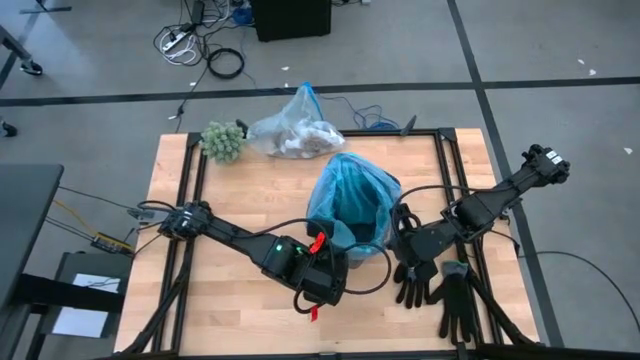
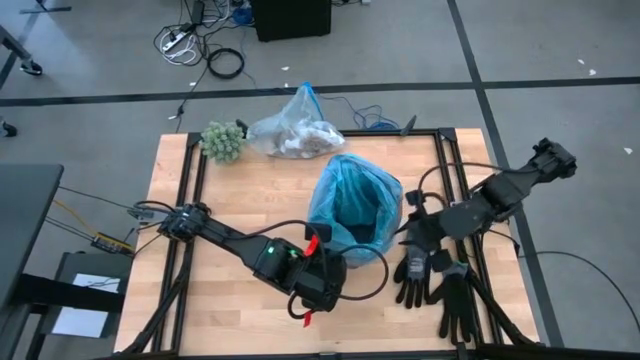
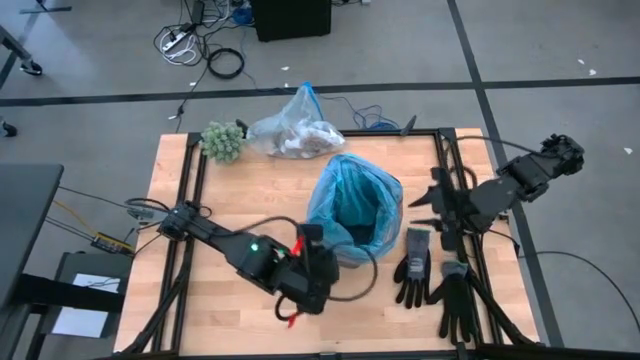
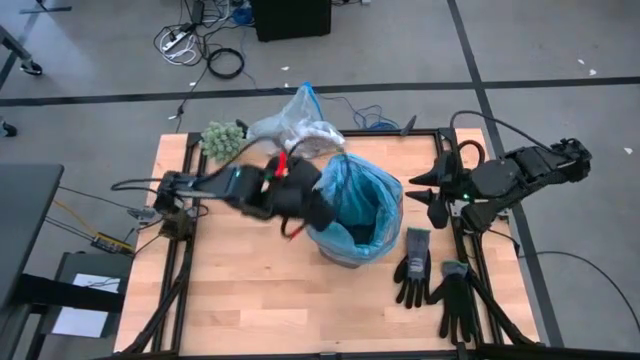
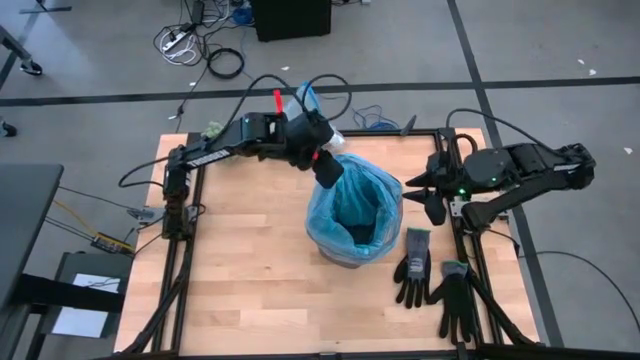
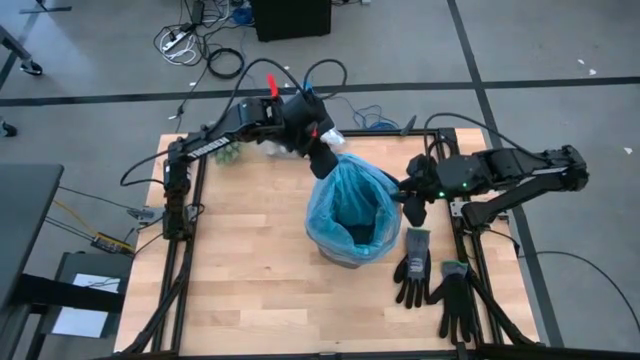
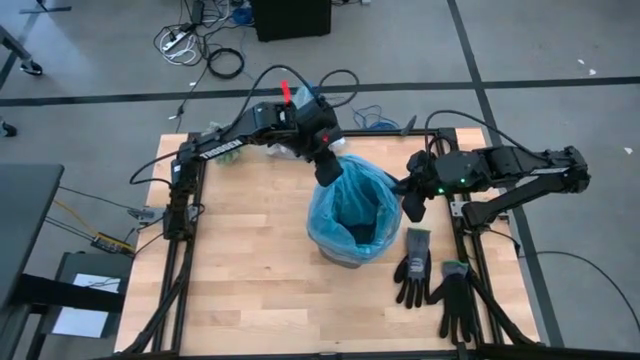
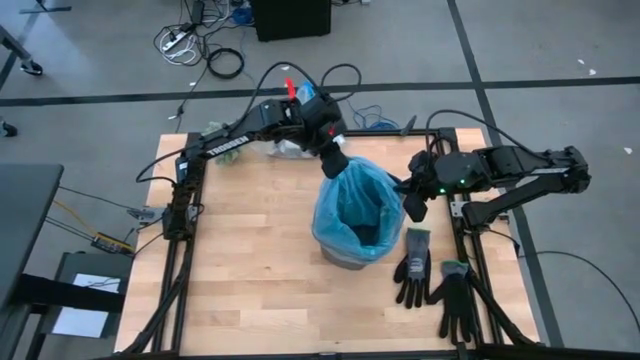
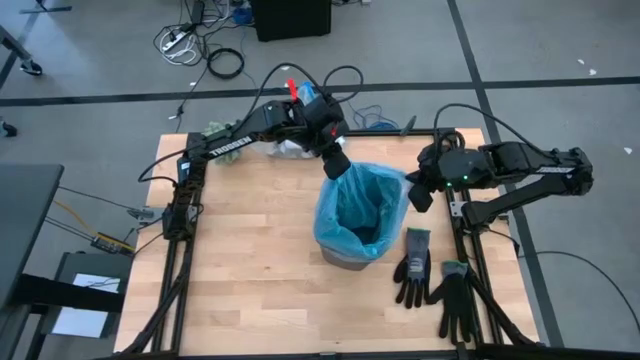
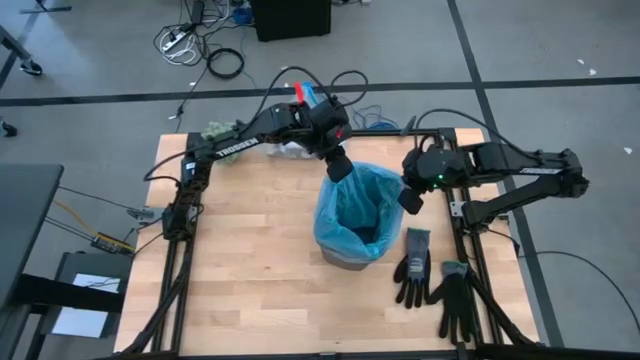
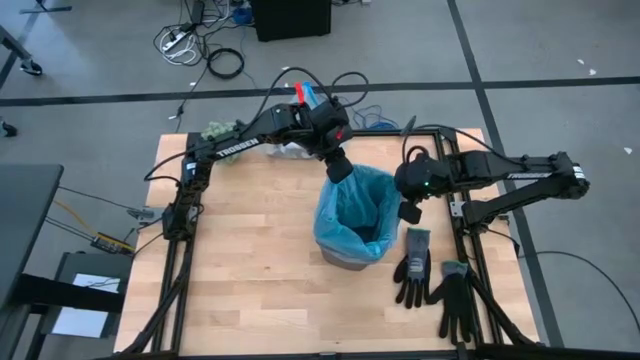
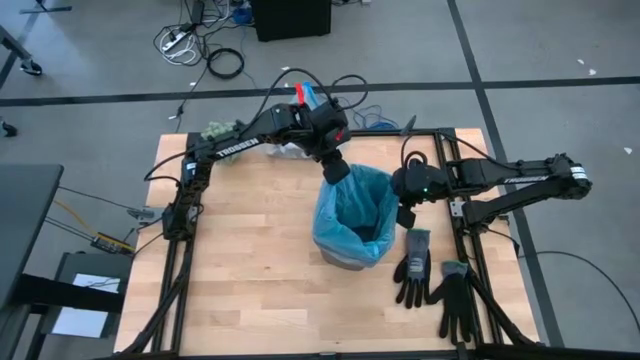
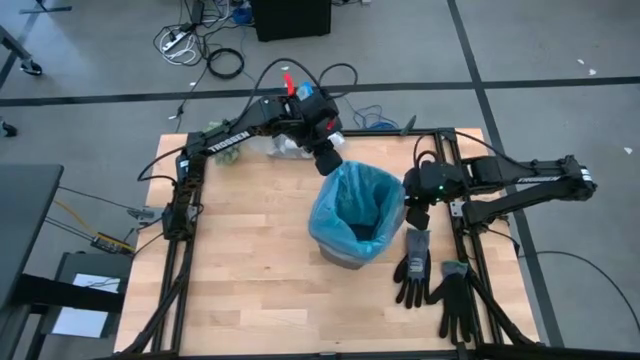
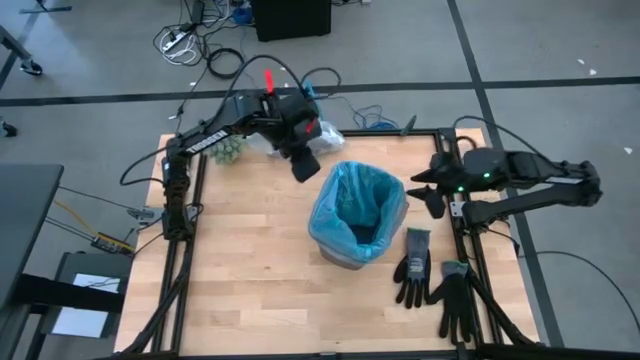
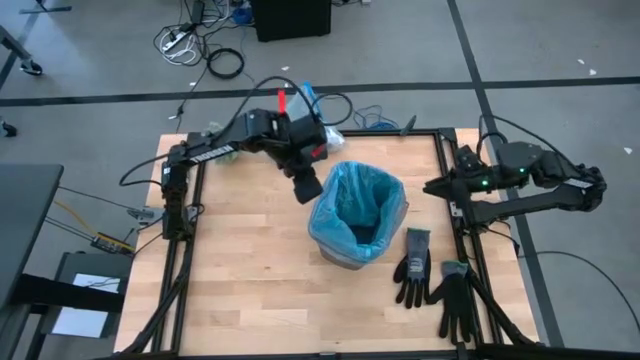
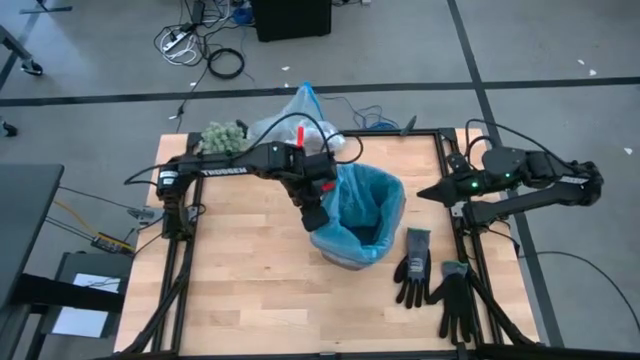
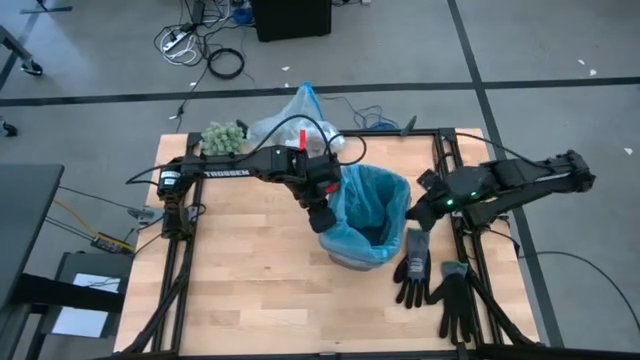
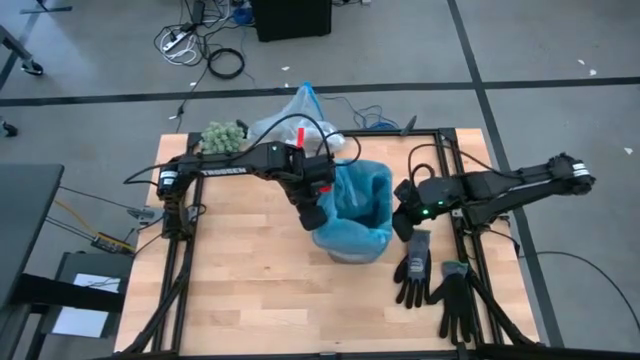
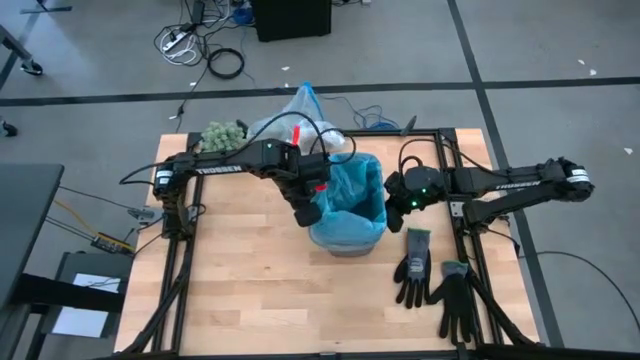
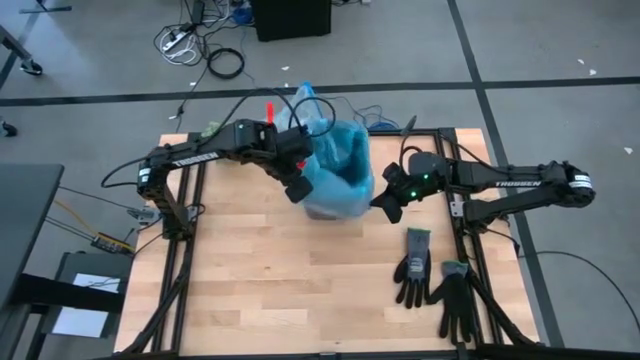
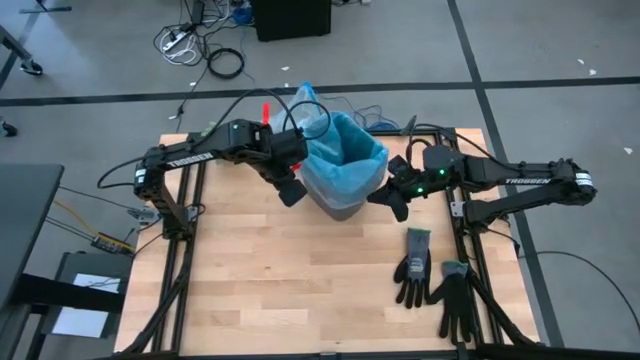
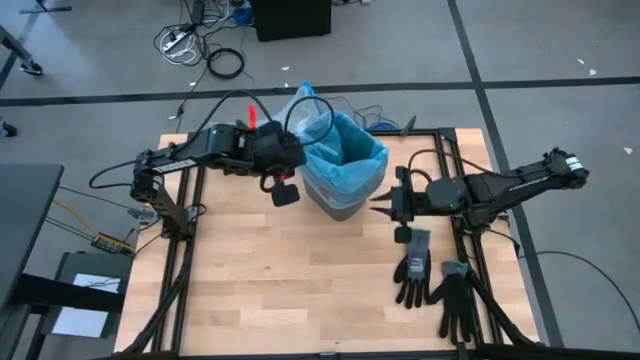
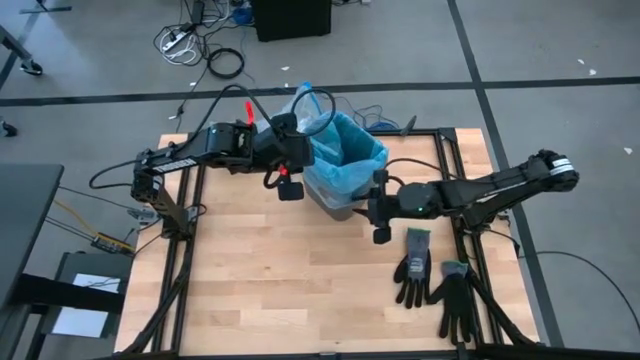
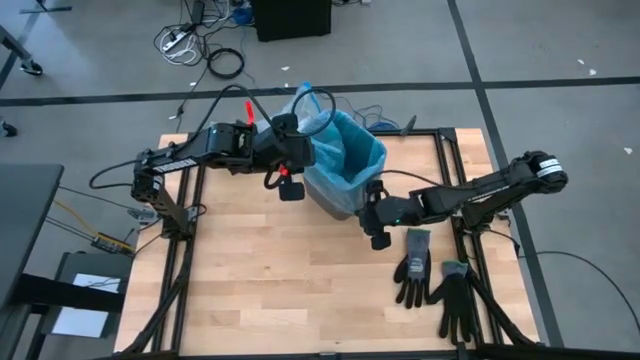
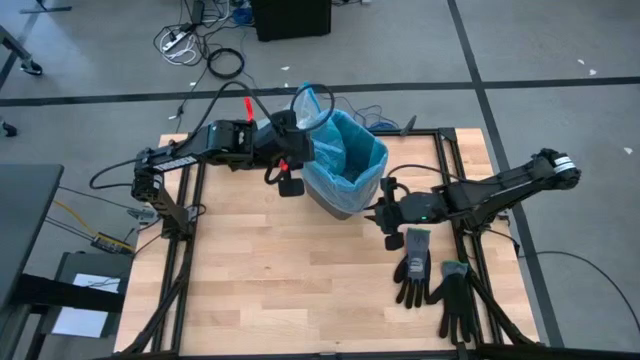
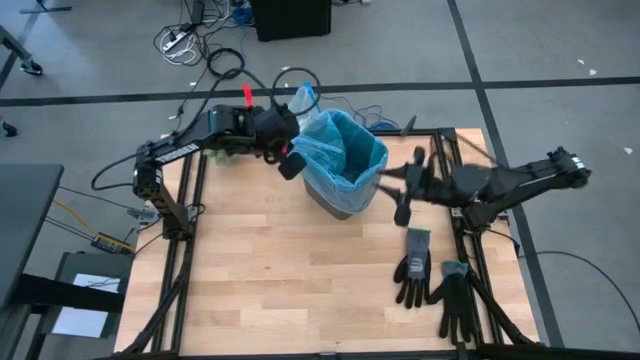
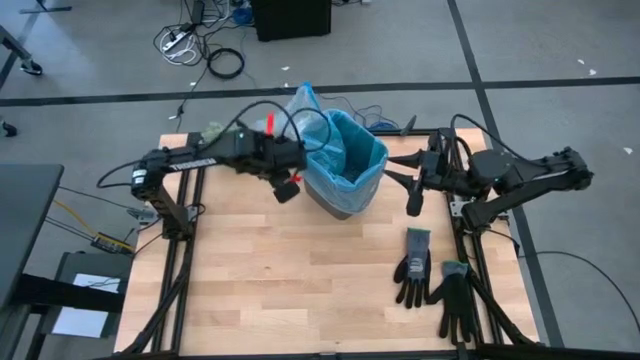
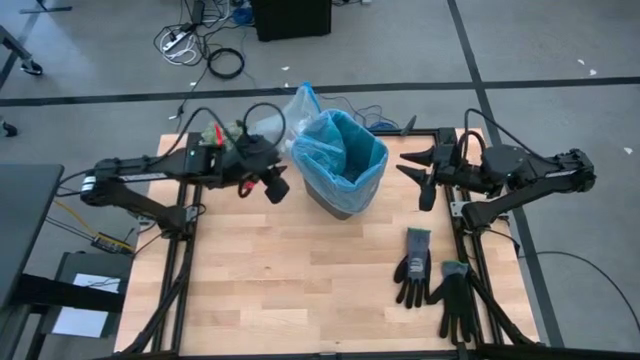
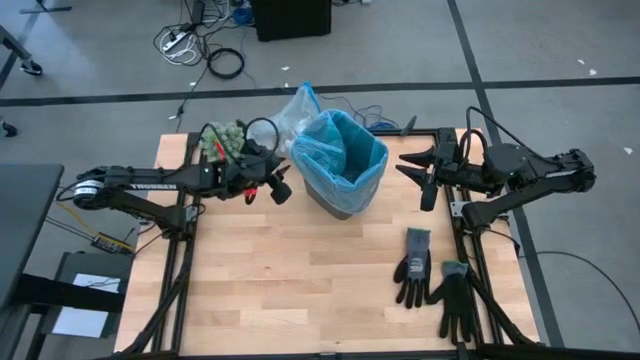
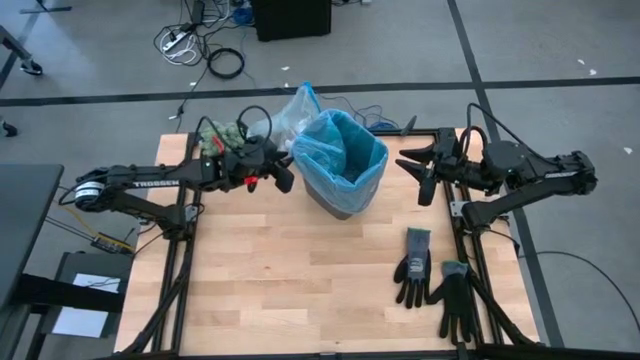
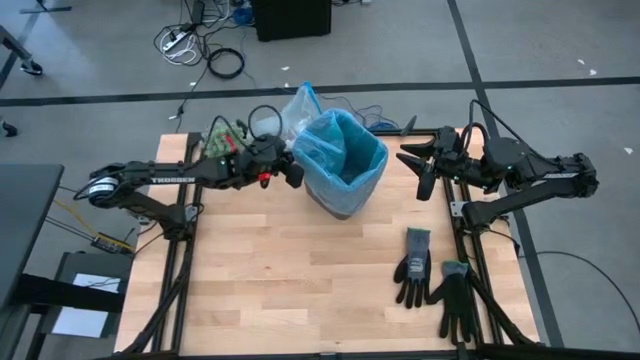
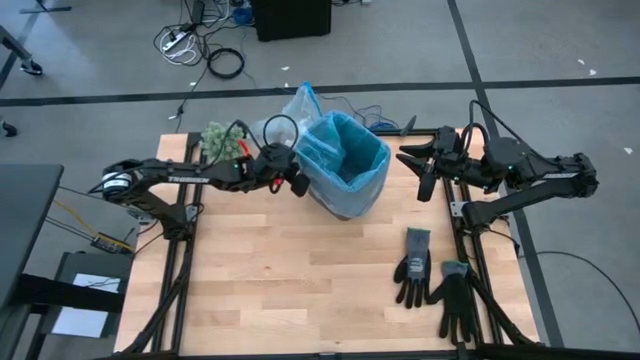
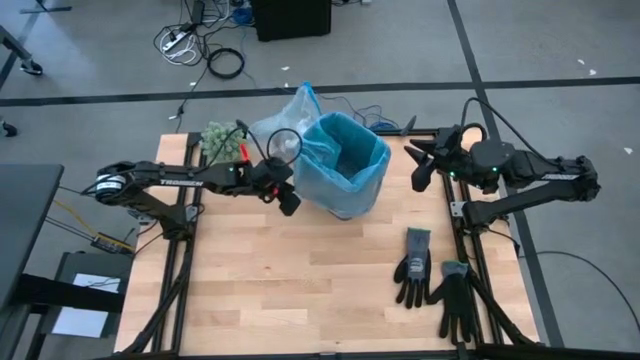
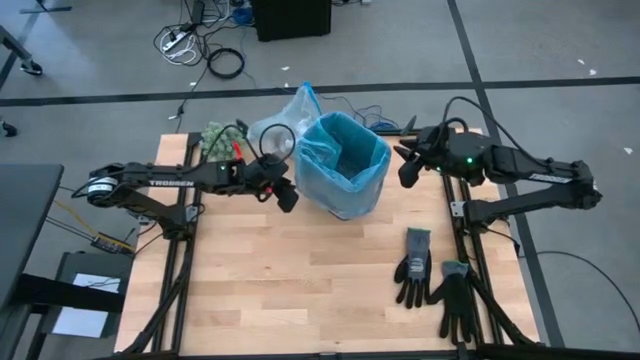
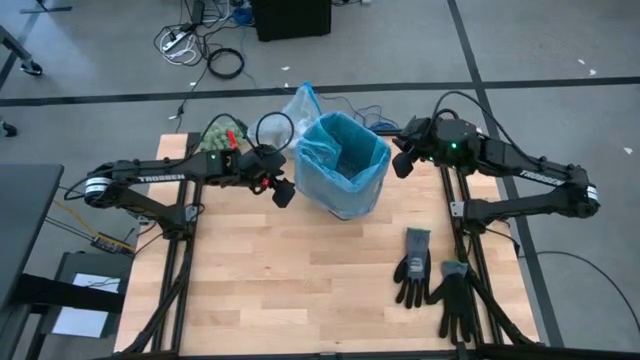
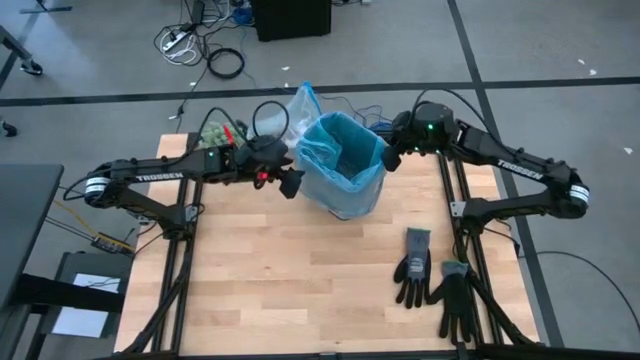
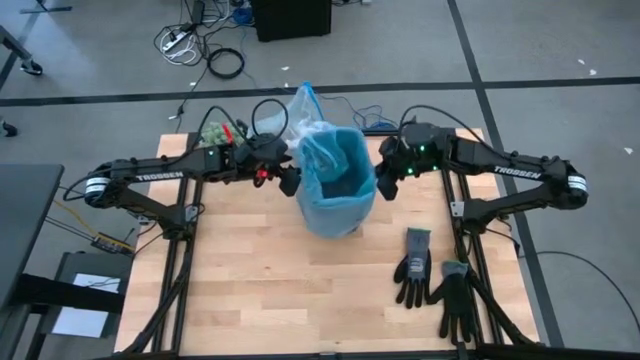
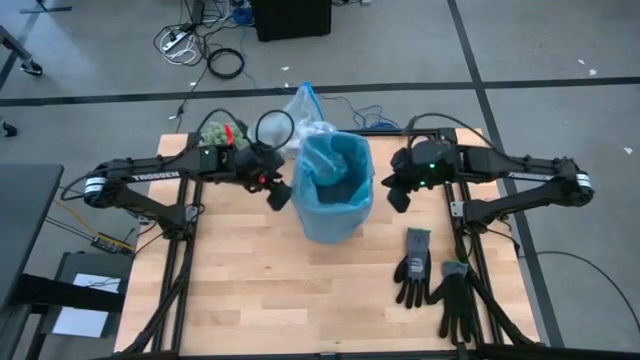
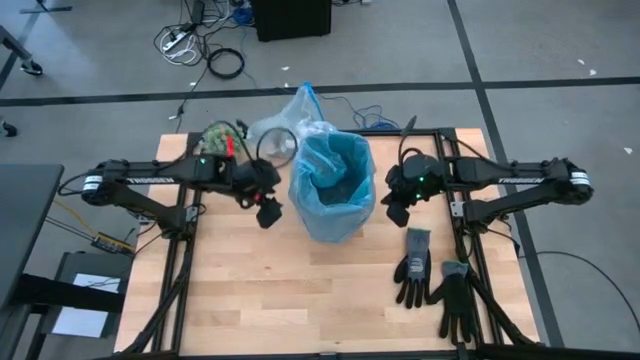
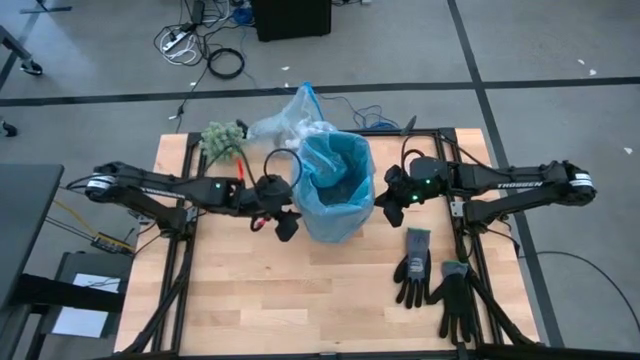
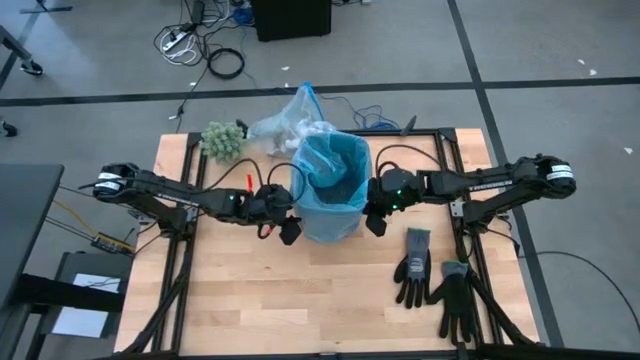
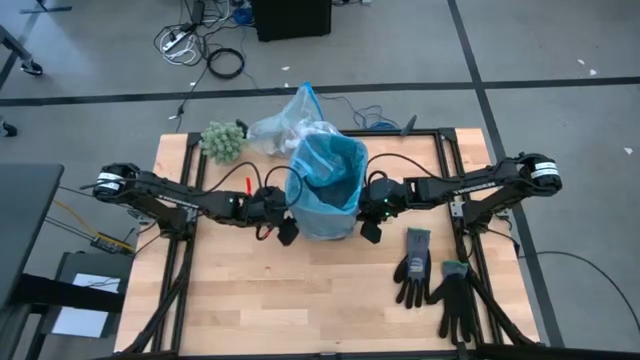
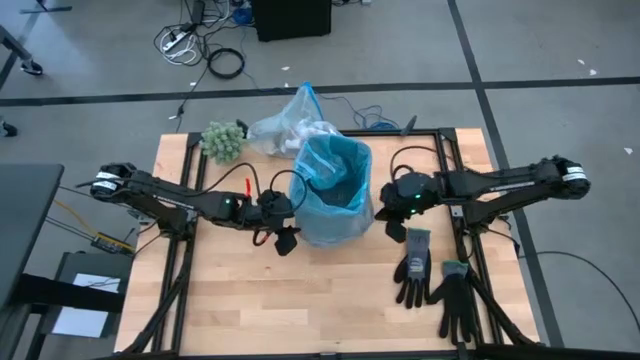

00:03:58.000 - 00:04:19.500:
Task: place trash/remove bag and relplace
Insert the new blue trash bag into the trash bin
